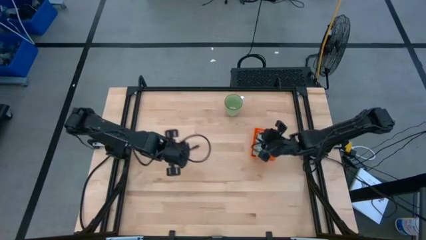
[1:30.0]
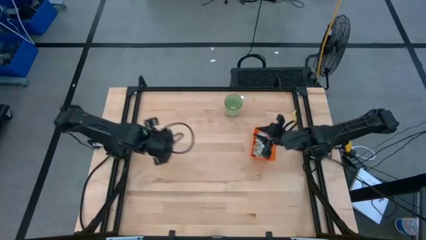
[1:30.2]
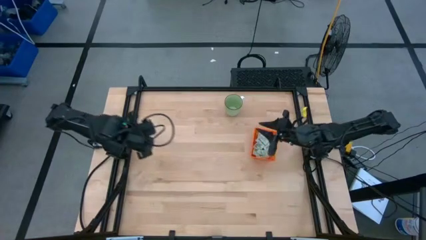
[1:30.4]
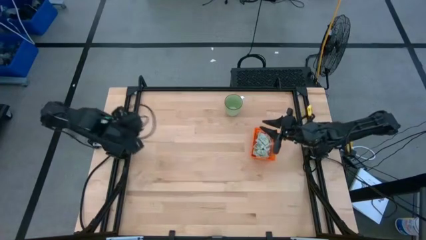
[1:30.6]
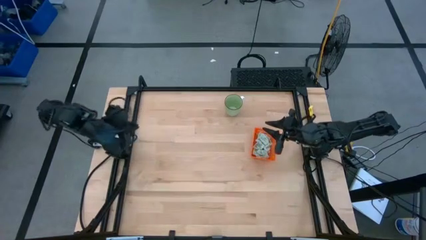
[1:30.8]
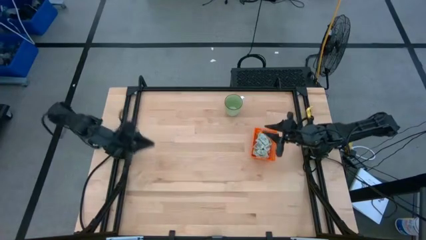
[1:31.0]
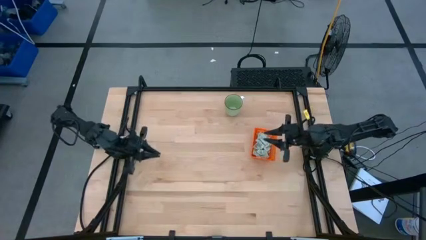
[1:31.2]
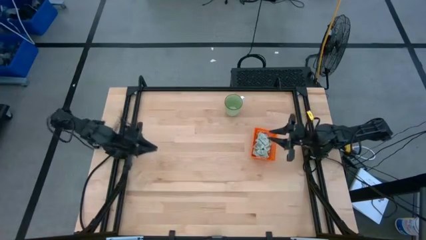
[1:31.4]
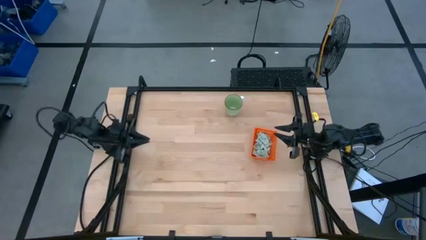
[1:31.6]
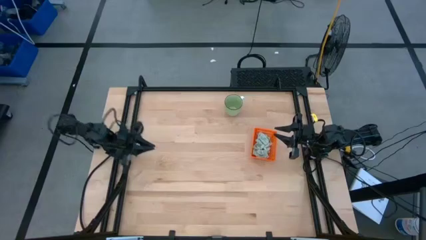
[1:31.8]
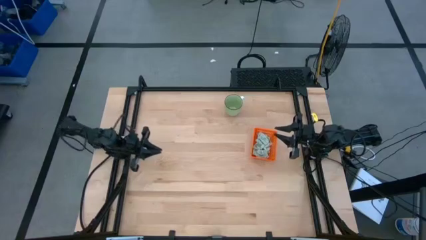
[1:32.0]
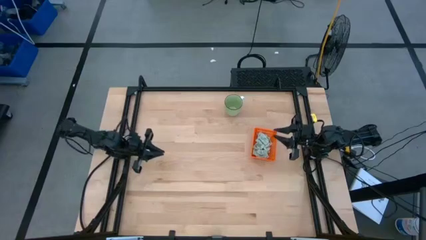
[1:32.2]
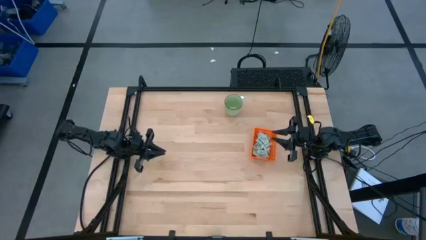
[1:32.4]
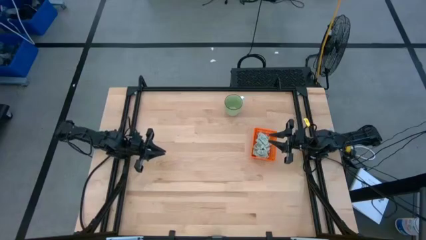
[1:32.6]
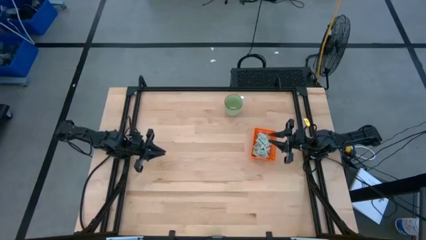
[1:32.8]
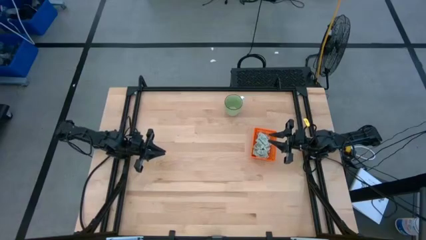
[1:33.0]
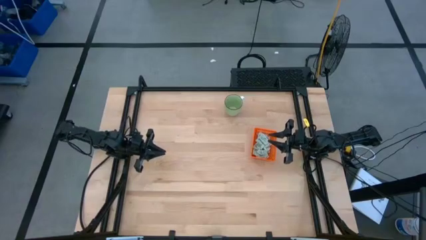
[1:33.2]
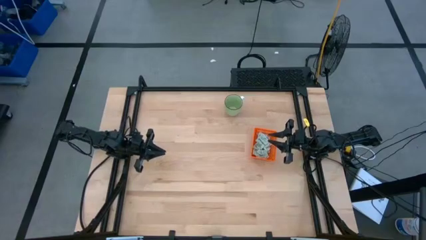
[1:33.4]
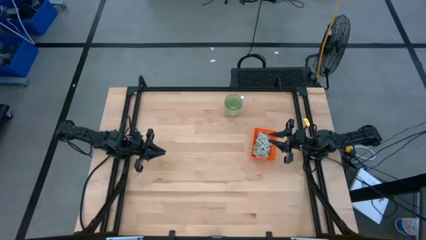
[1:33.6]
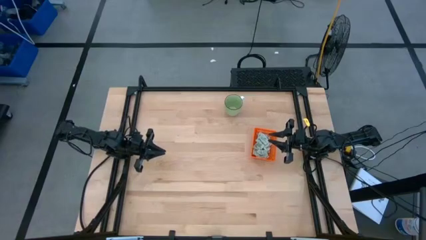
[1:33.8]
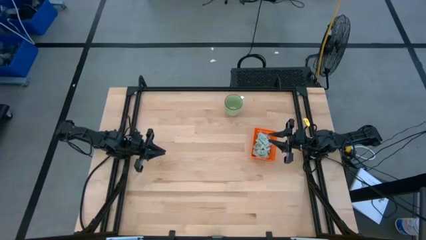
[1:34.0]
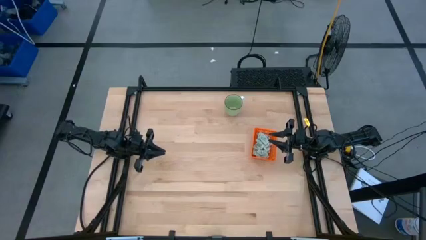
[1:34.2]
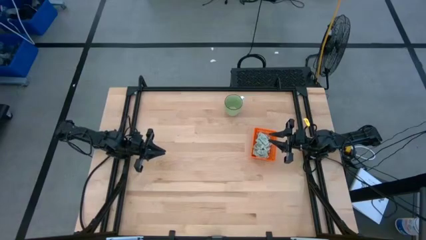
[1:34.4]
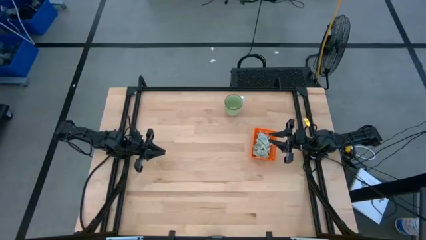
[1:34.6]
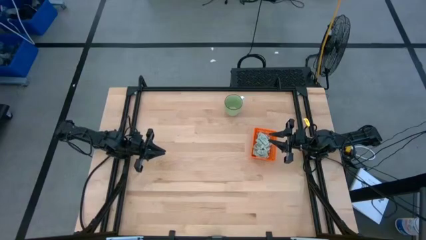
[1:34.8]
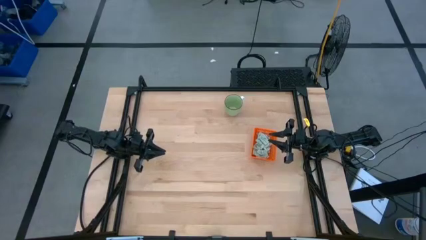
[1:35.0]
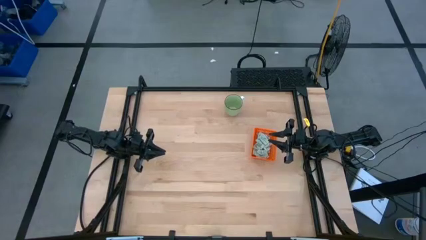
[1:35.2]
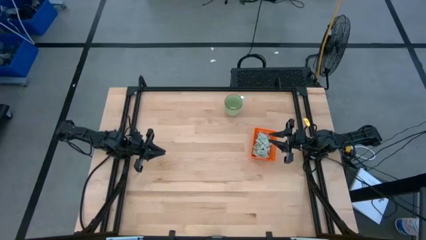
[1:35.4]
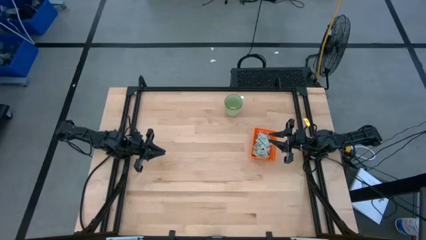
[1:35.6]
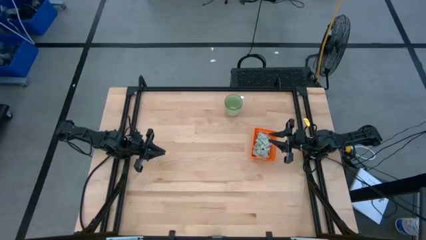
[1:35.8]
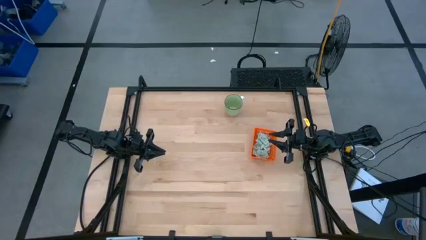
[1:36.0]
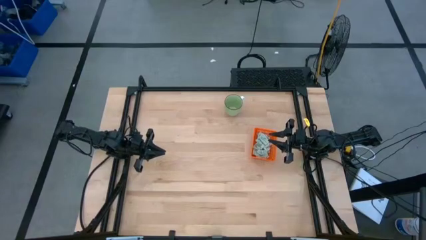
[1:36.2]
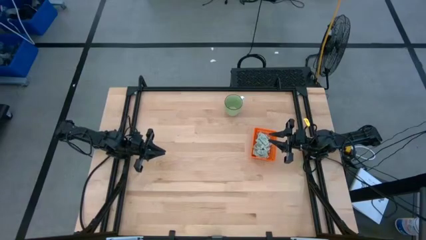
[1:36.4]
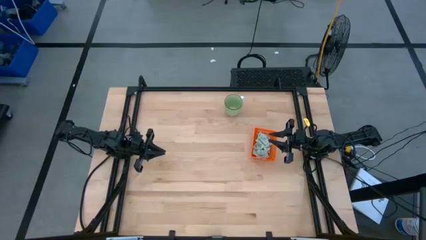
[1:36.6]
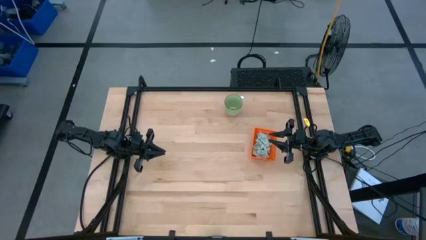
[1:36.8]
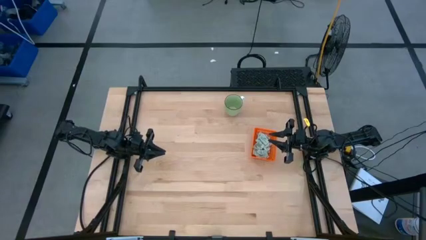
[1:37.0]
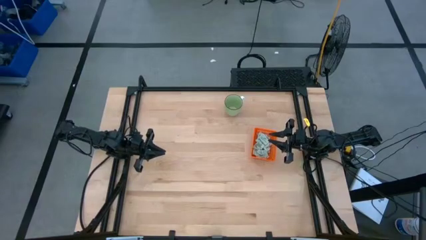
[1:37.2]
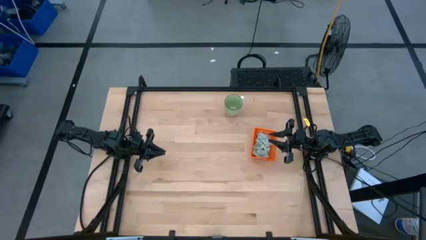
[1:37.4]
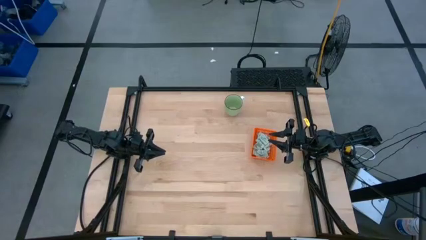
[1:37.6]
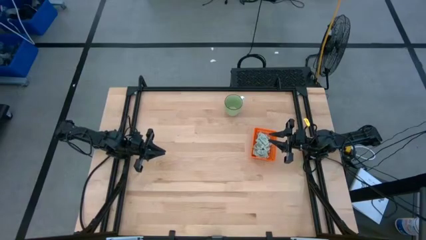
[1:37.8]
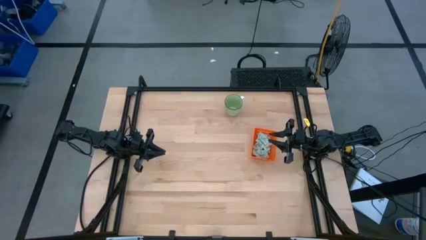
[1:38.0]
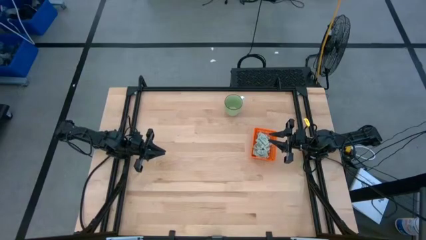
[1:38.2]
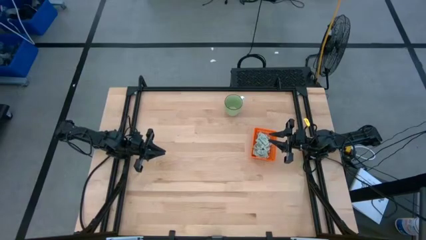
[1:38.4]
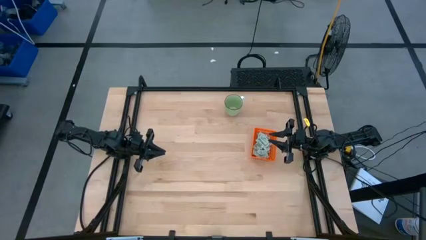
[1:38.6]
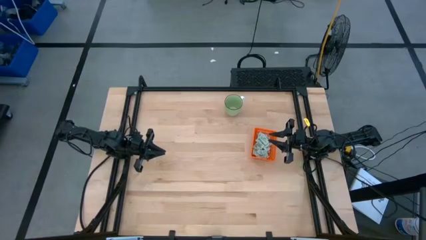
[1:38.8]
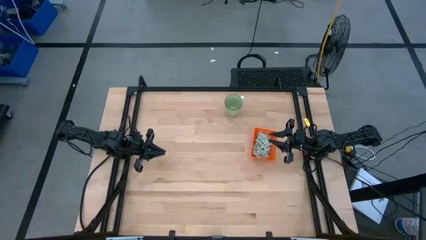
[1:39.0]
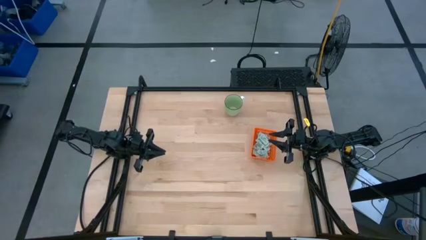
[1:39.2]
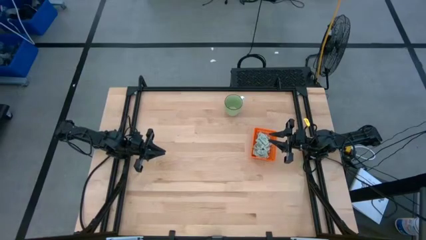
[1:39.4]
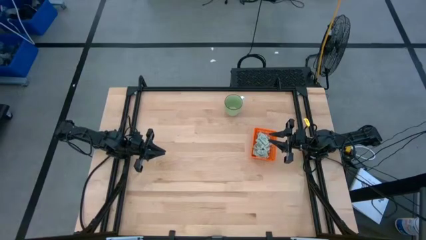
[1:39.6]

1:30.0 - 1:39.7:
Task: Pick and place Stevia / Truvia into bins
Return to Home Position

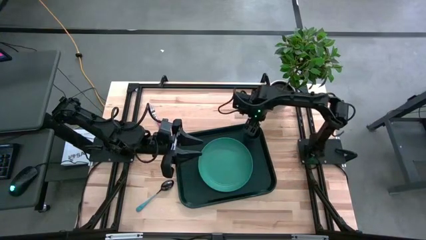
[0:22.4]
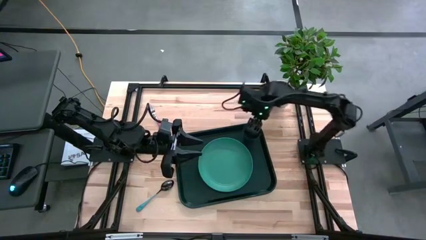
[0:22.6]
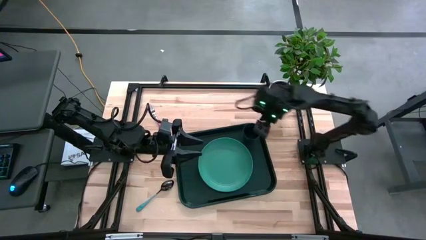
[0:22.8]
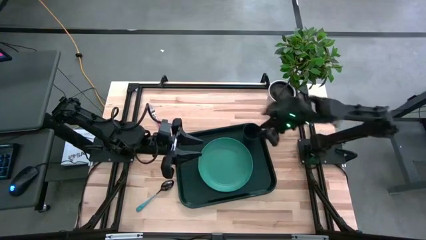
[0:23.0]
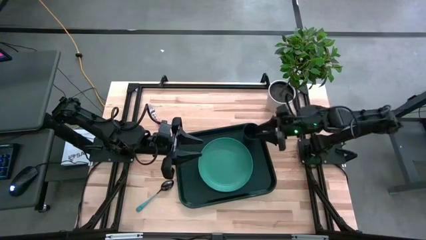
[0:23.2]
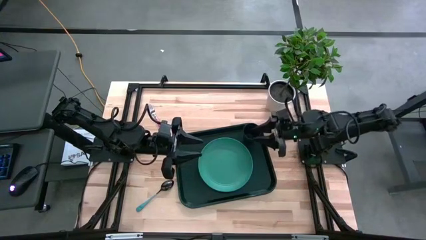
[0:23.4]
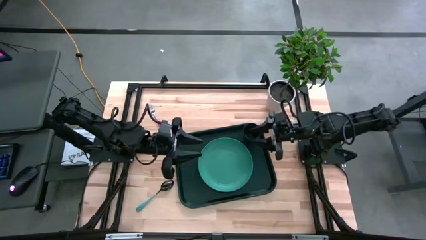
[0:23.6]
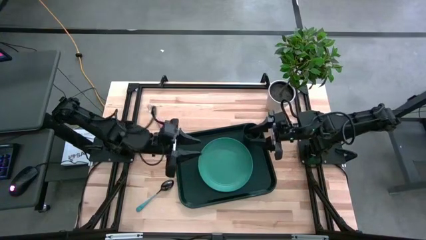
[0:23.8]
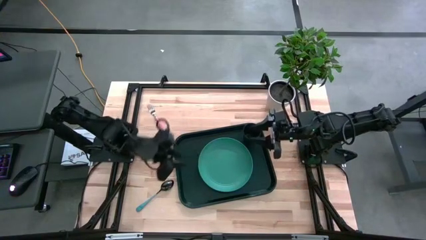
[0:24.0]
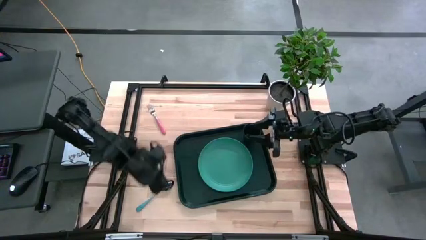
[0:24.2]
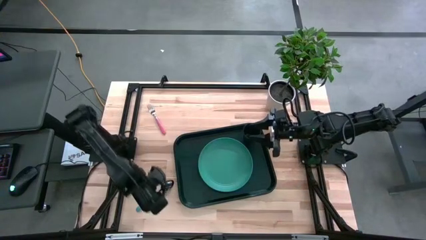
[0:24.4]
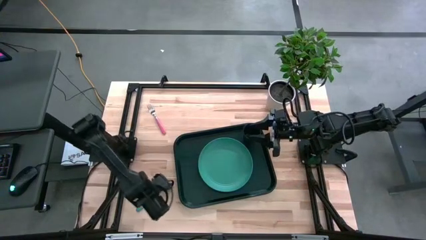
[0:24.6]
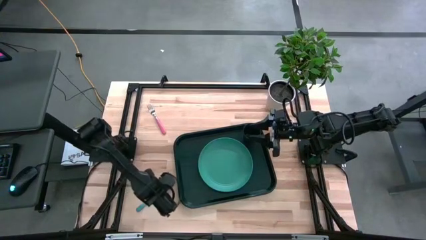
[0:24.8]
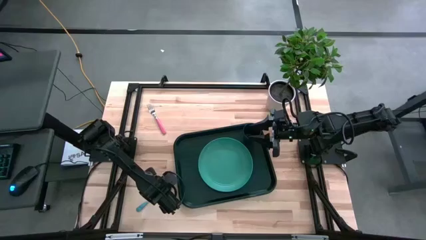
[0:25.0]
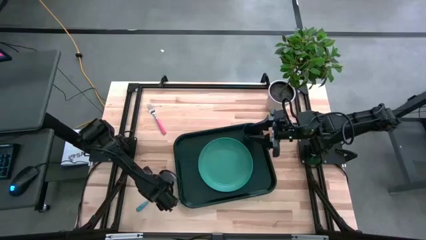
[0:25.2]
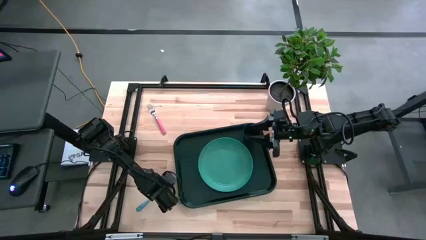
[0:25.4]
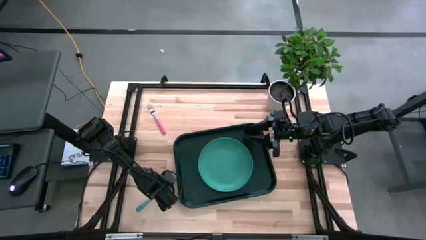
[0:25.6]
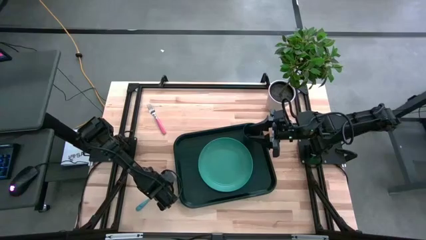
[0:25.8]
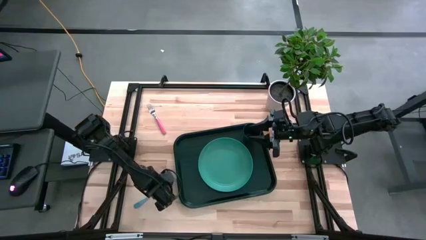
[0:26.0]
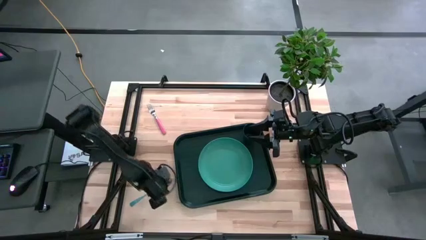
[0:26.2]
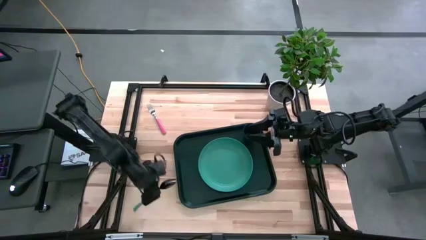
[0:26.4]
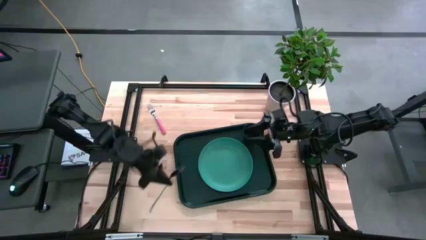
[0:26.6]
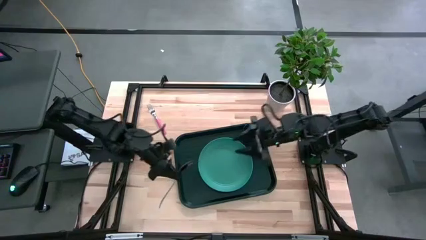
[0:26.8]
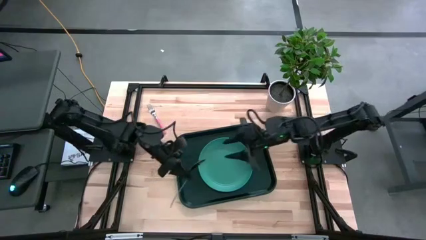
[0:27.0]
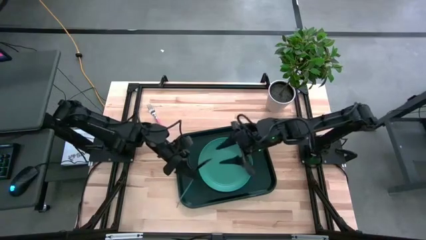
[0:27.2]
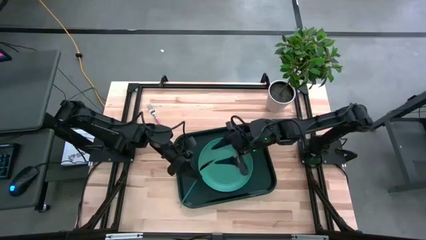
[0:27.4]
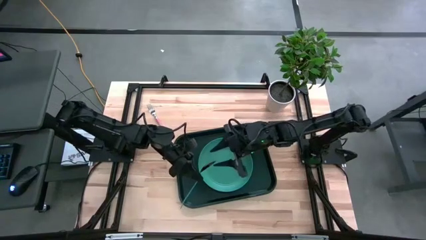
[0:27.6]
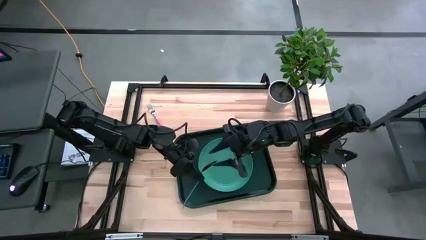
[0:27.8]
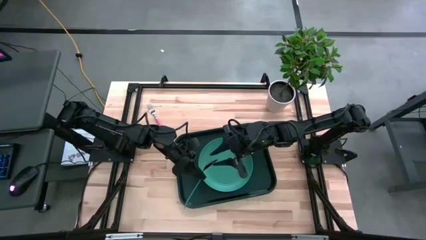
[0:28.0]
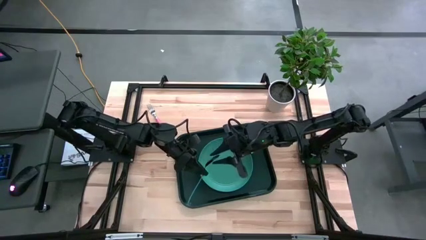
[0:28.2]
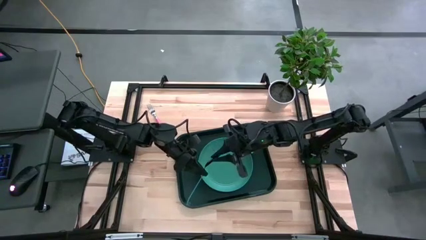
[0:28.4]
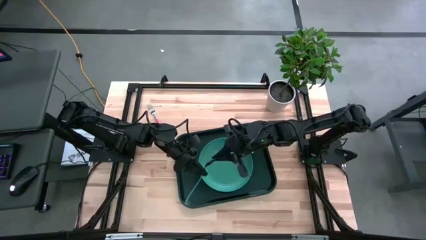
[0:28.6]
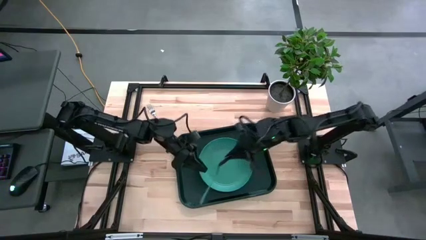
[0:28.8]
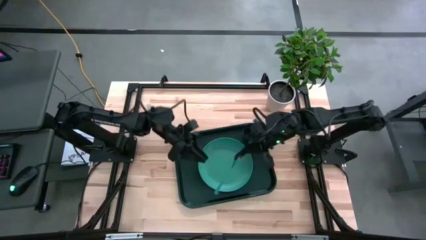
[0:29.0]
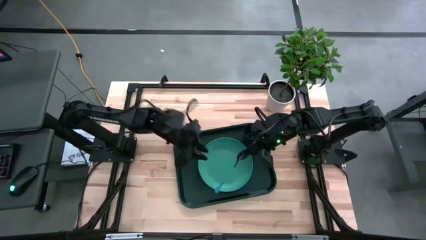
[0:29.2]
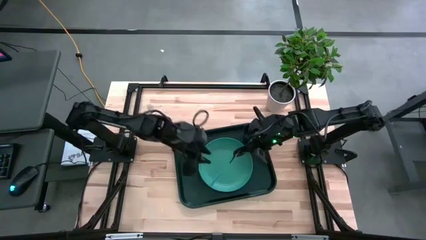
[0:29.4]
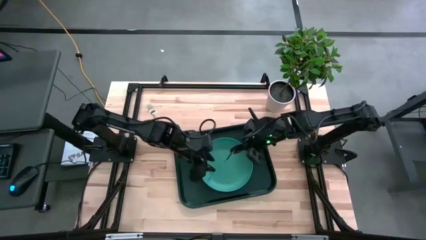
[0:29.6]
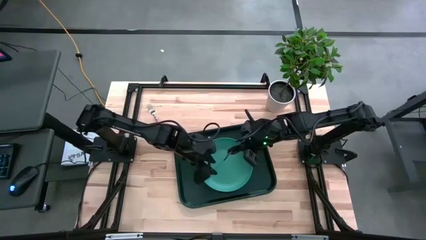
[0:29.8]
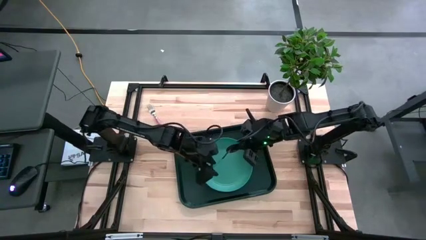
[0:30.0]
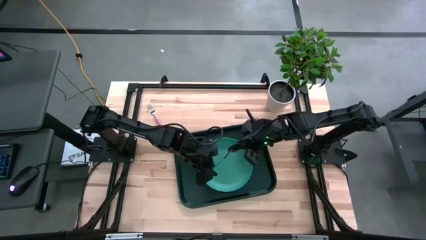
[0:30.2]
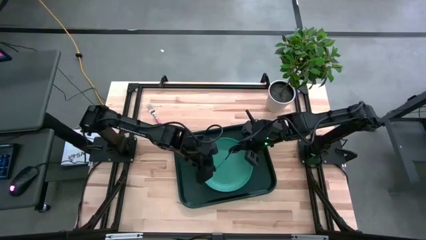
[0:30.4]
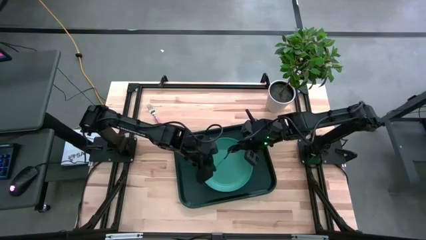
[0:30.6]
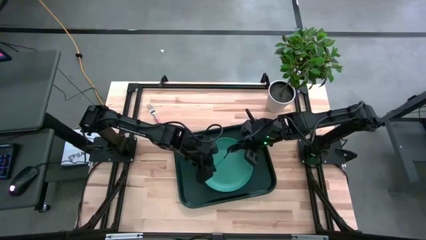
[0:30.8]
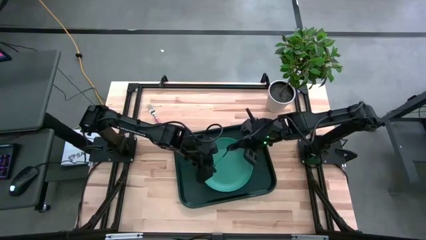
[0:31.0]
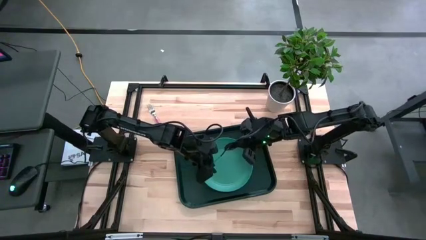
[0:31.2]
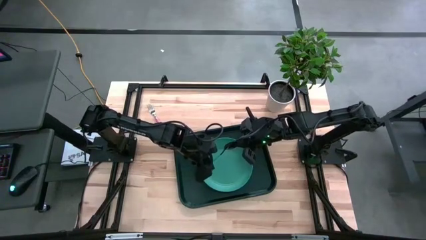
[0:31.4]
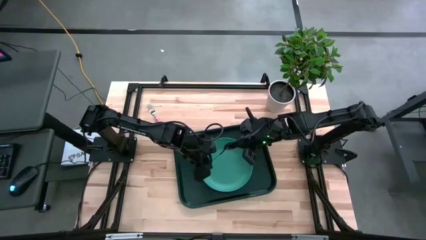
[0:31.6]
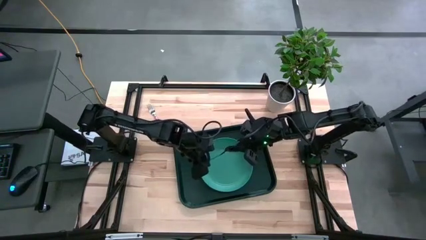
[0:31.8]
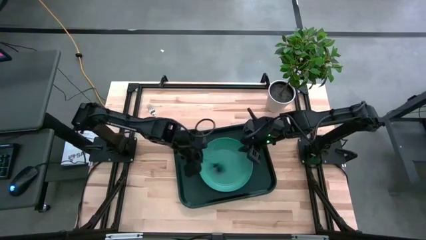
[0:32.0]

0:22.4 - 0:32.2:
Task: Pick and place plate/cup/fork/spoon on tray
Put the blue spoon on the black serving tray to the left of the green plate
